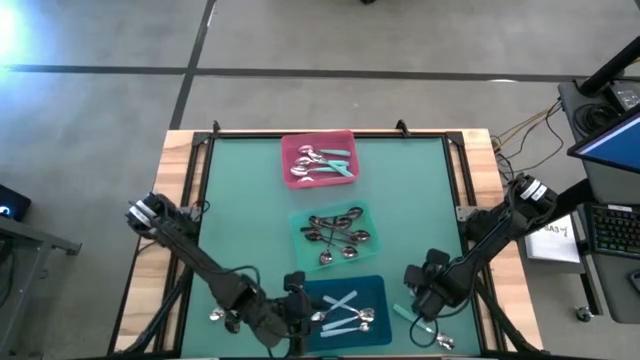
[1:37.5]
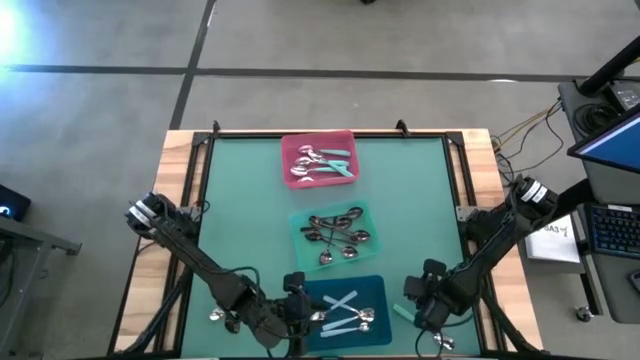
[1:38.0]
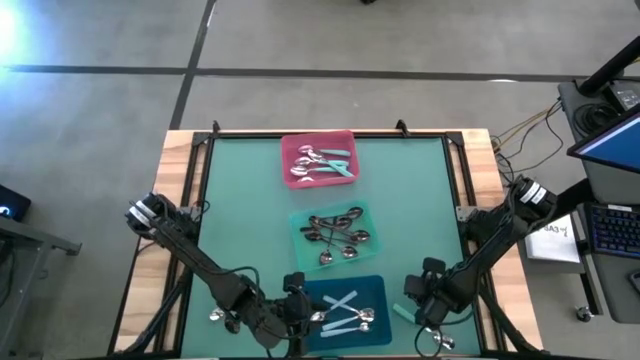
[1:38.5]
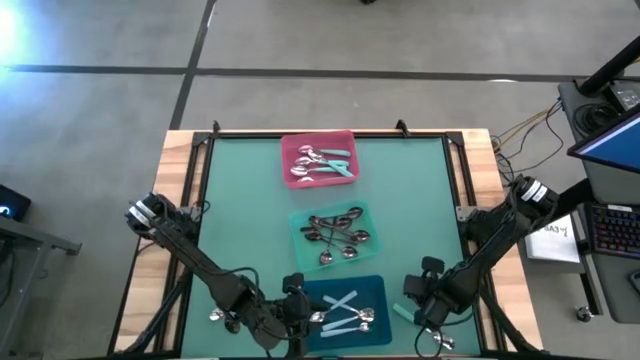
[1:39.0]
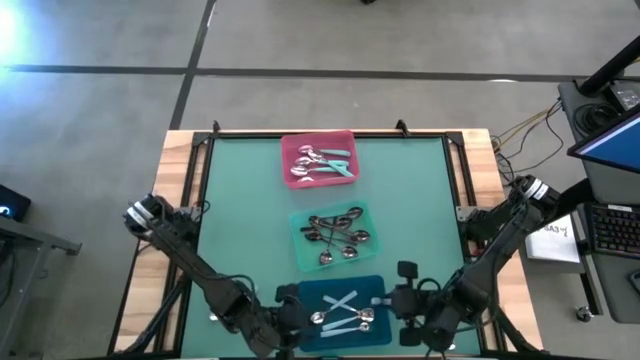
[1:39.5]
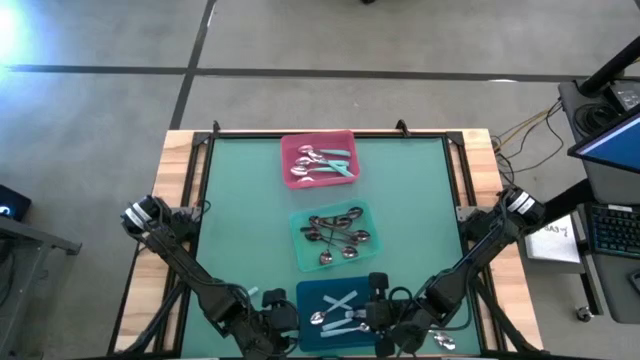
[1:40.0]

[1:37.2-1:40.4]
Task: Sort silverware by color (type)
Put the blue spoon into the blue bin

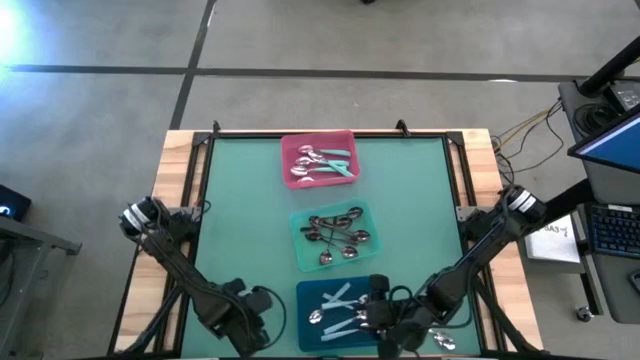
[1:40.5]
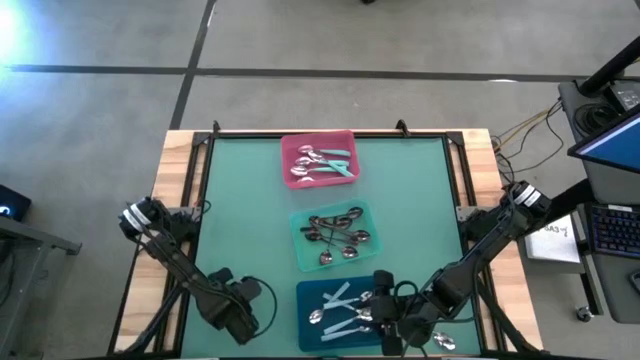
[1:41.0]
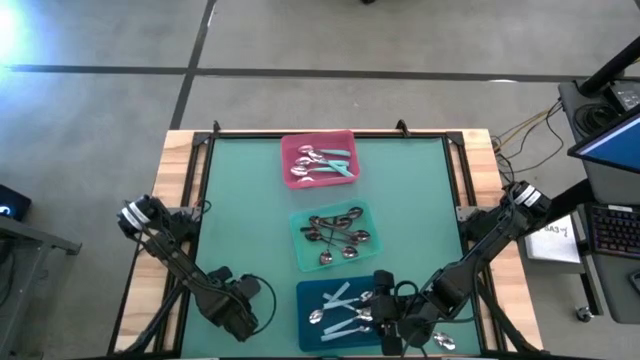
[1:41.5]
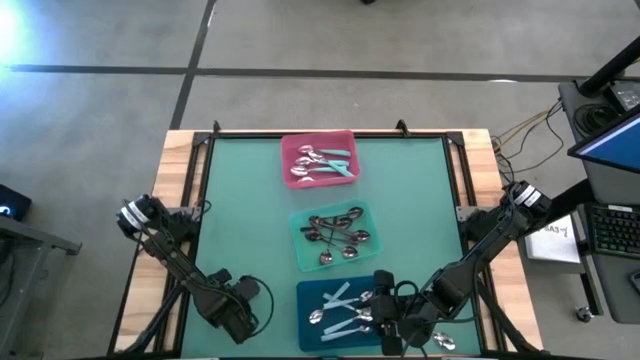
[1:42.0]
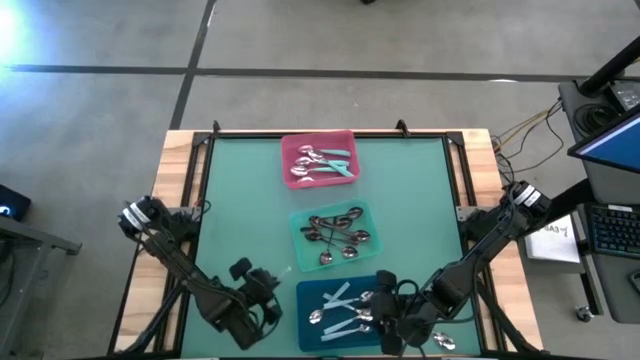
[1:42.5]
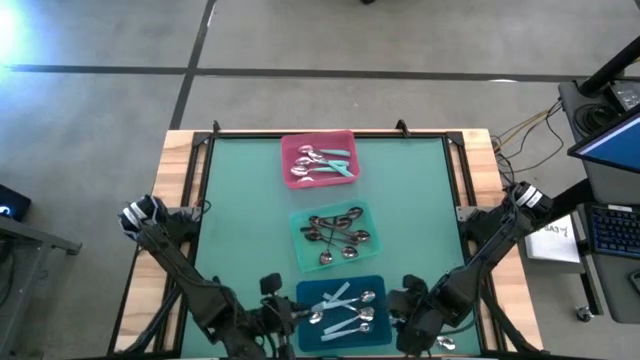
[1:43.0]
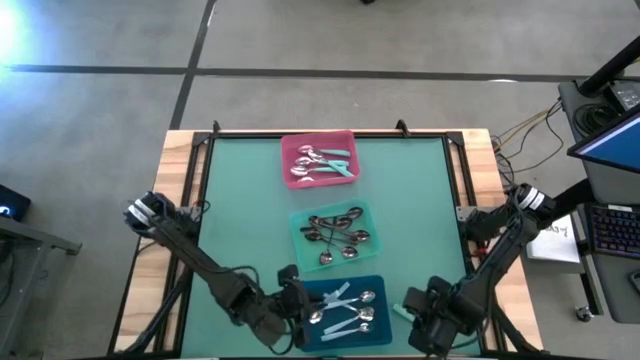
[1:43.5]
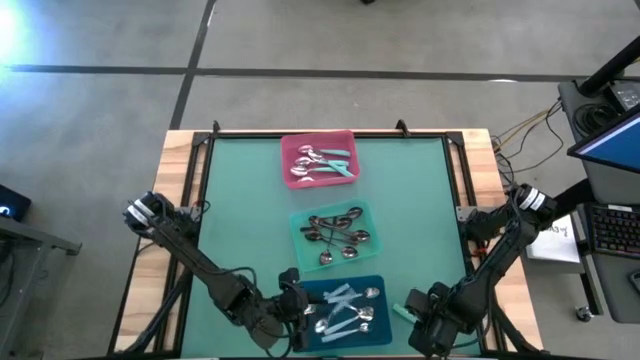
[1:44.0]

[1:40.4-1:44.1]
Put the blue spoon into the blue bin

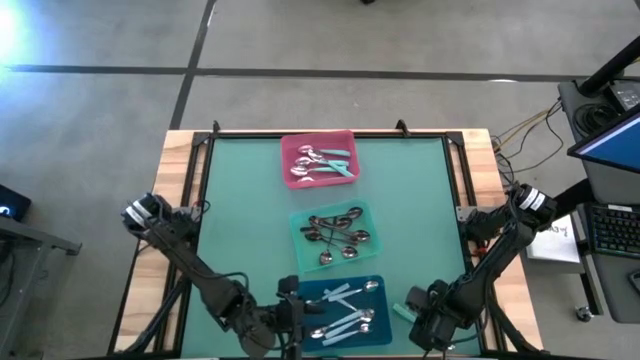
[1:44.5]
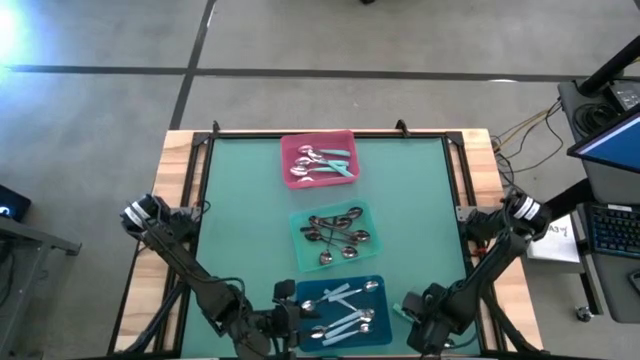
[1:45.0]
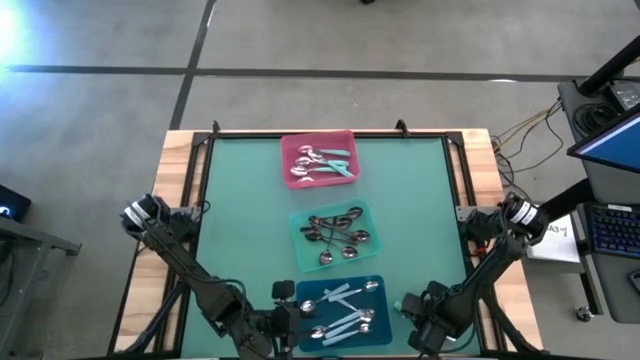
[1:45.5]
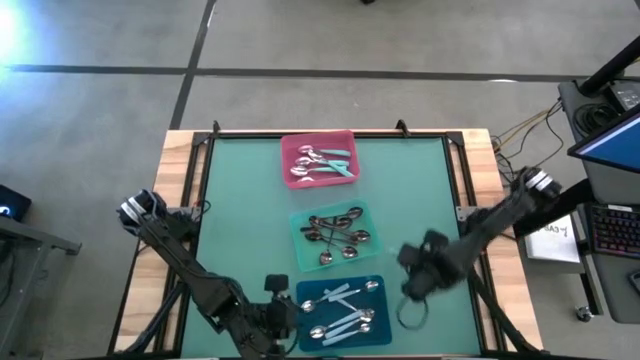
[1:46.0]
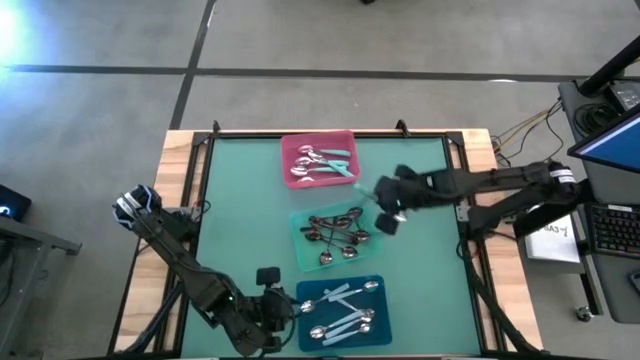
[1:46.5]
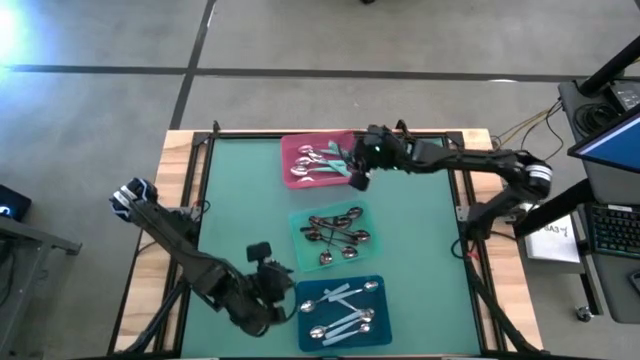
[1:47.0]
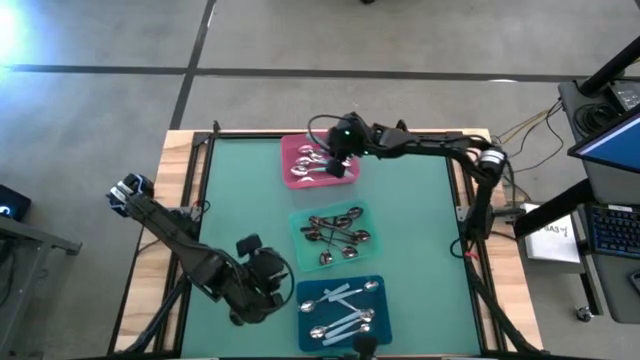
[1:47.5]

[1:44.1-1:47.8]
Put the green spoon into the pink bin

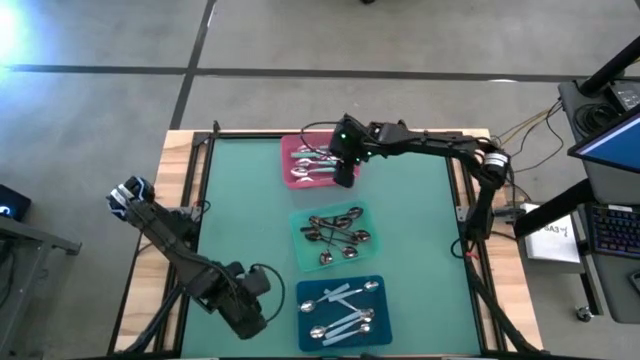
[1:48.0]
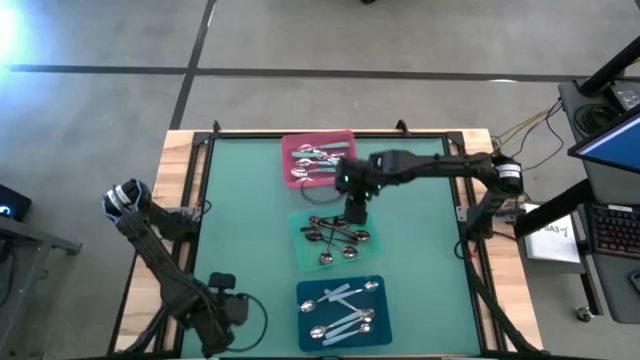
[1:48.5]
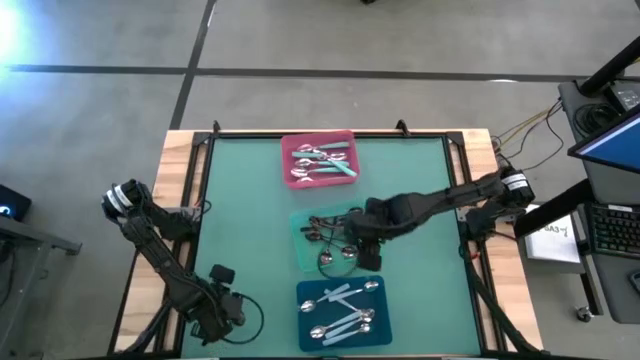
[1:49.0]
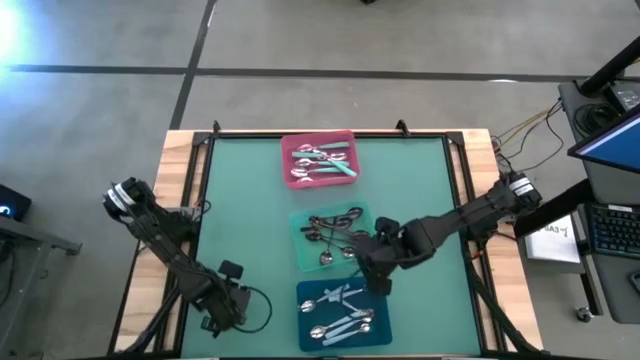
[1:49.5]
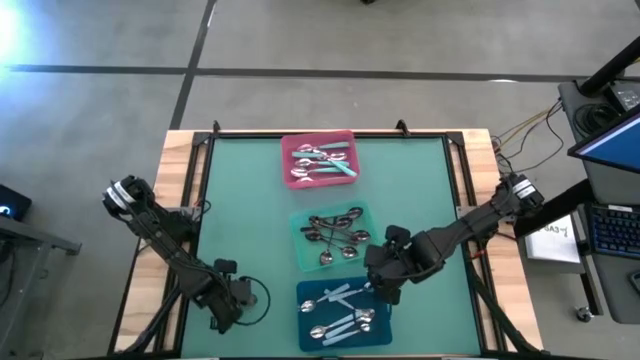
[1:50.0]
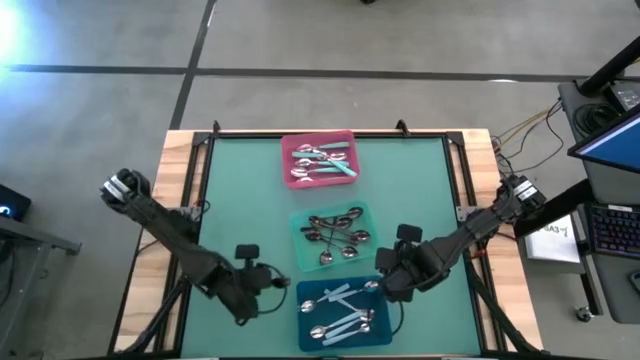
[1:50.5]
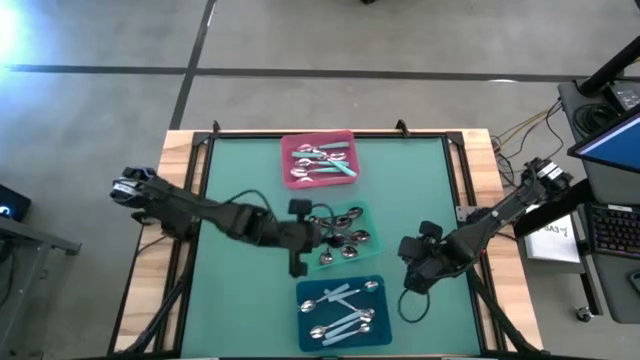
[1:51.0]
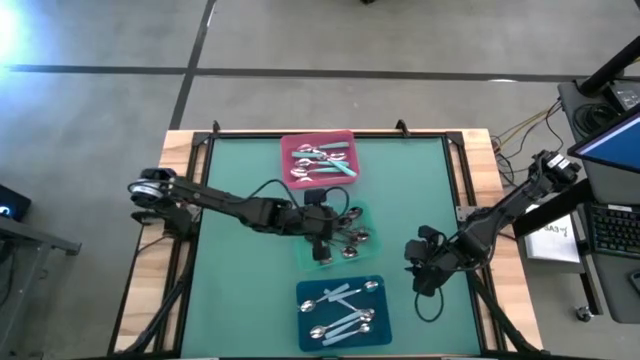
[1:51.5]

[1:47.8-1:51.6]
Put the black spoon into the green bin

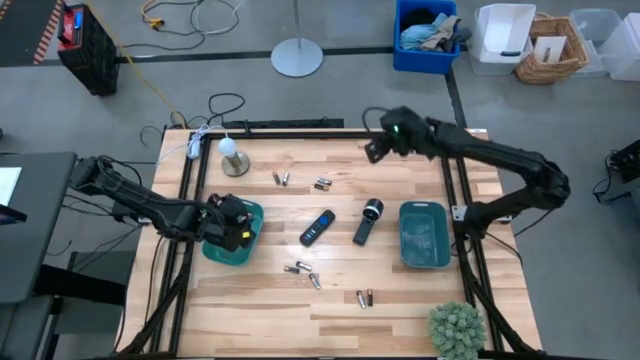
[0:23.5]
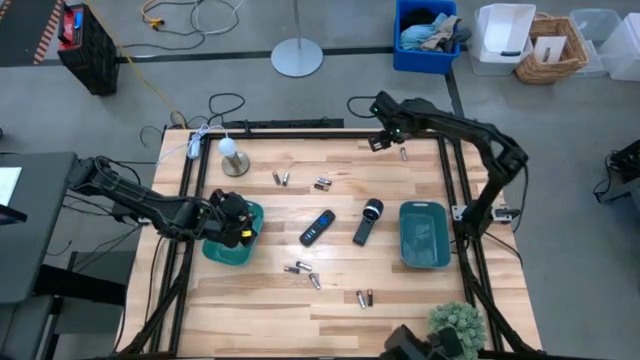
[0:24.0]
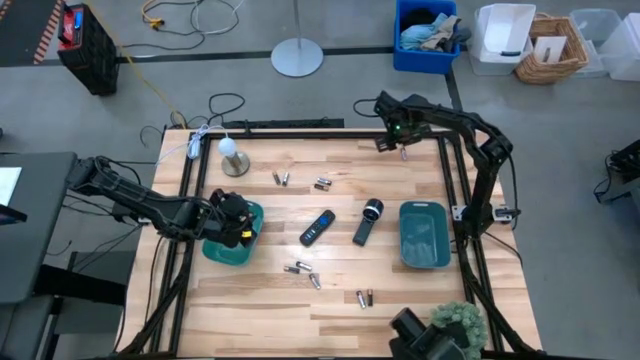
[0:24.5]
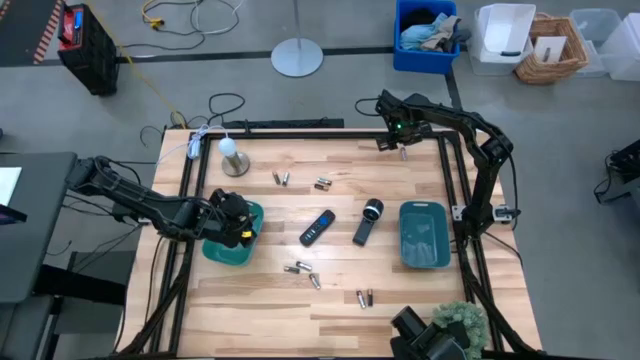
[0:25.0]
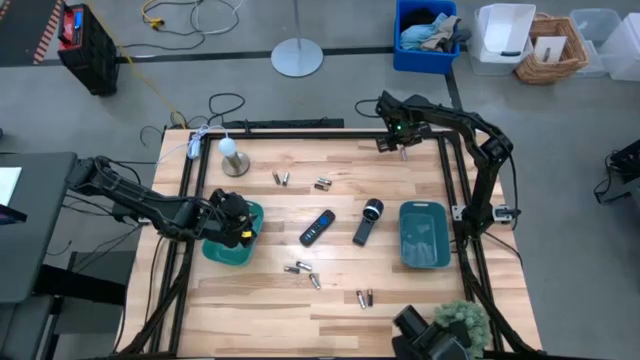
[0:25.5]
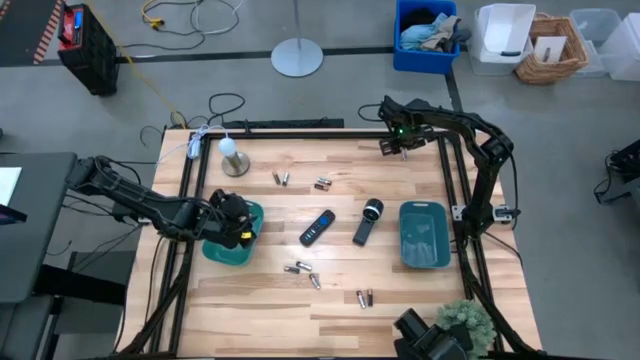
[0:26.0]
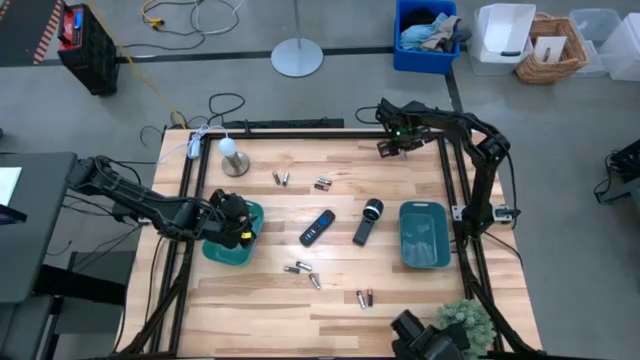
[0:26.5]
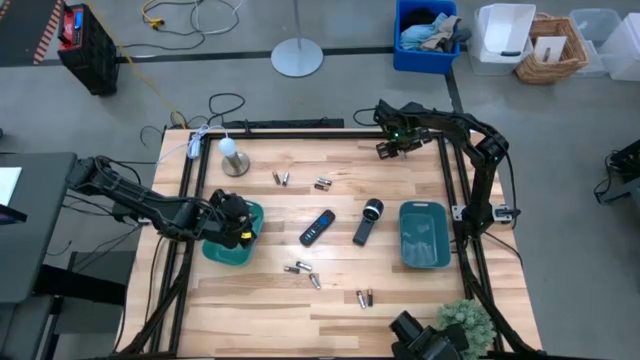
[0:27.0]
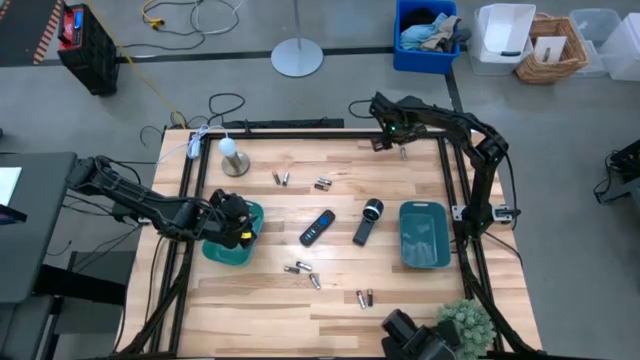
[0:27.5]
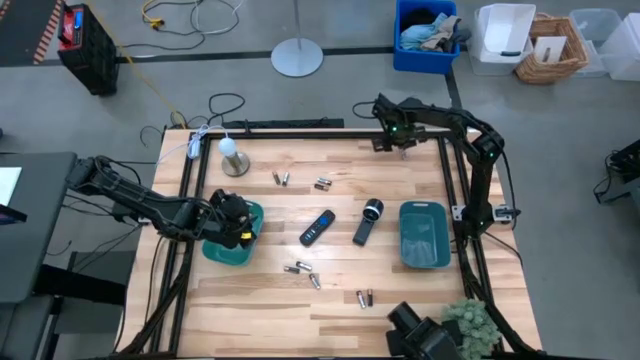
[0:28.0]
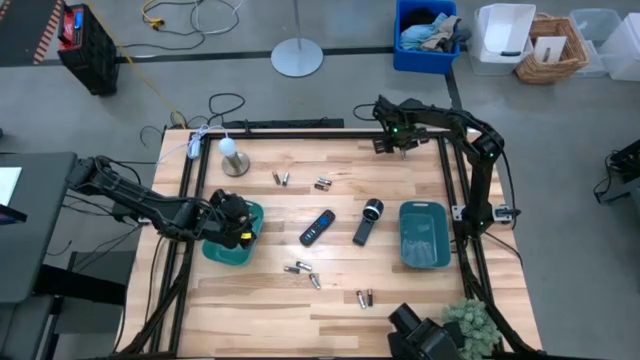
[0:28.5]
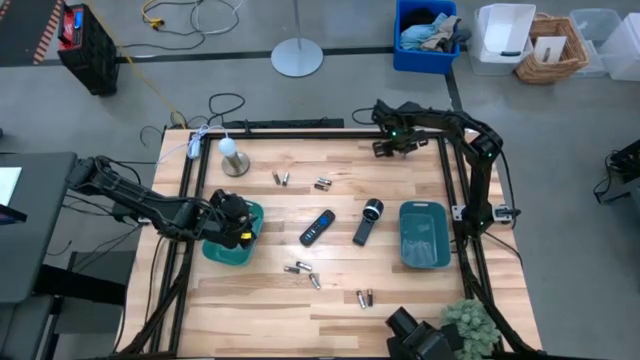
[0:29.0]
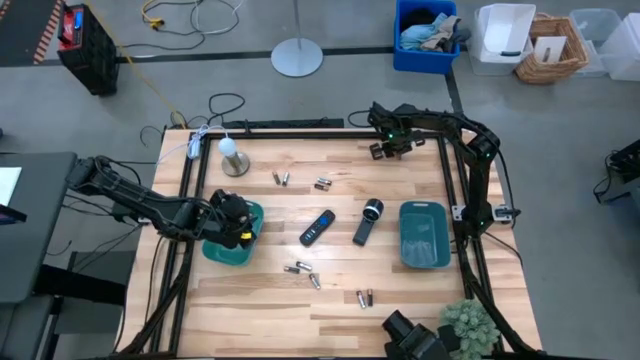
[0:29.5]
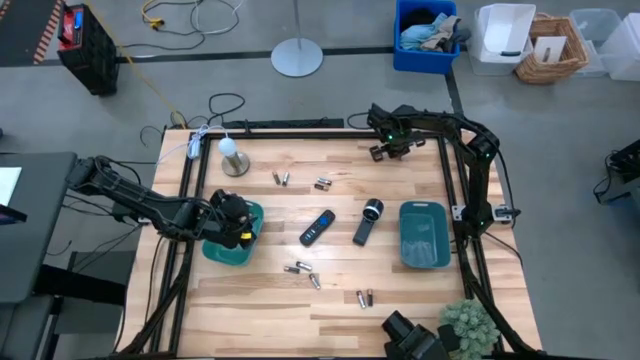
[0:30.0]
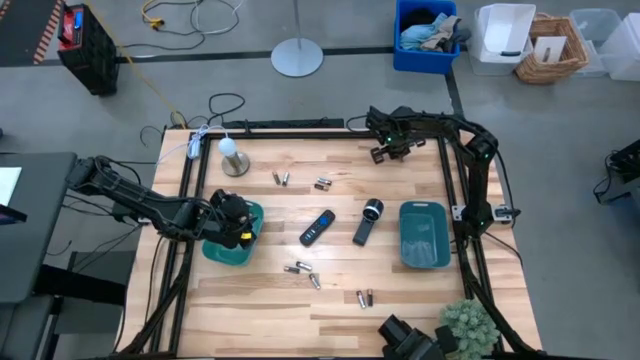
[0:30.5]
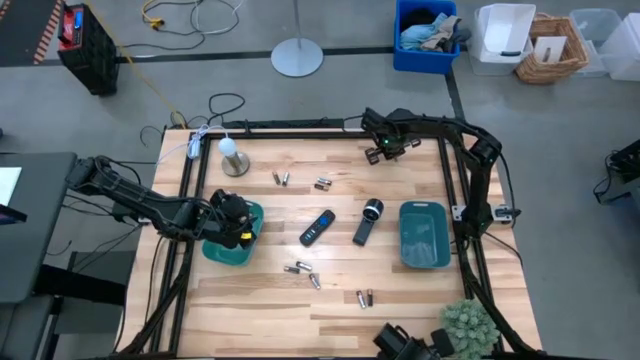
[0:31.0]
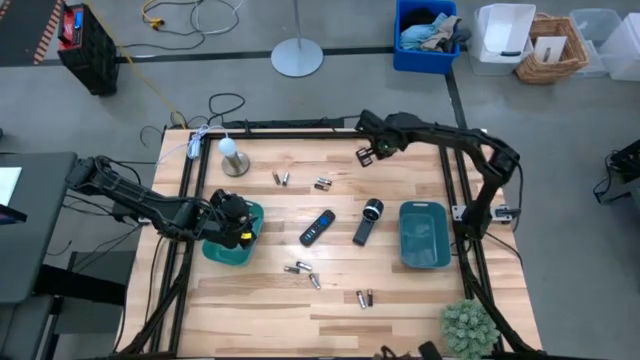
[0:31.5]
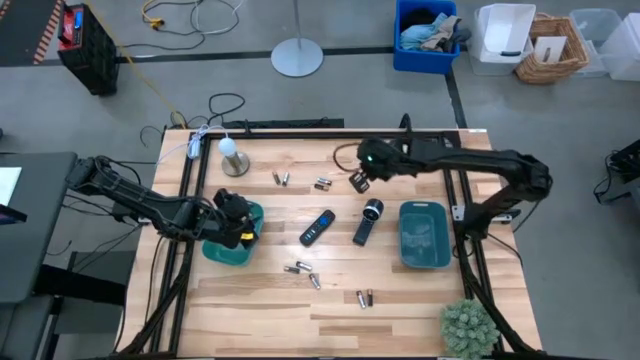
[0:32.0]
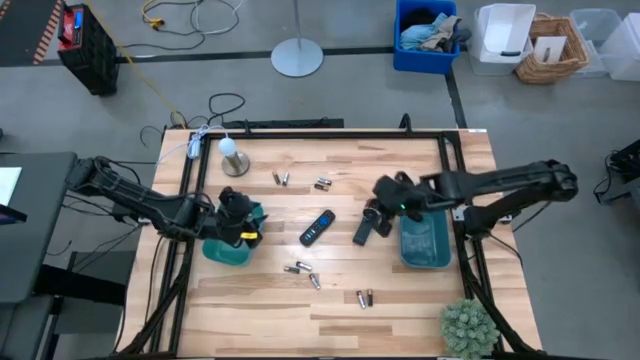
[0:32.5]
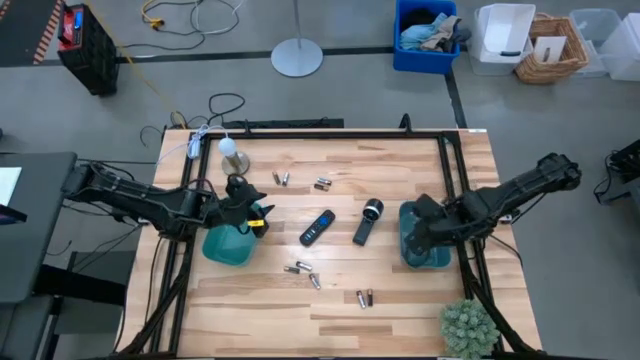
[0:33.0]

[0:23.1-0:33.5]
Task: Sort batteries
Put the silver battery into the blue bin
